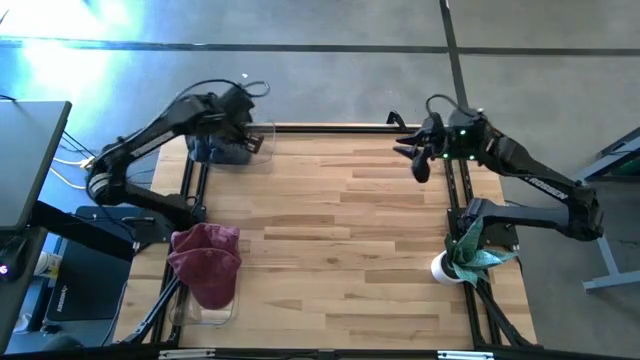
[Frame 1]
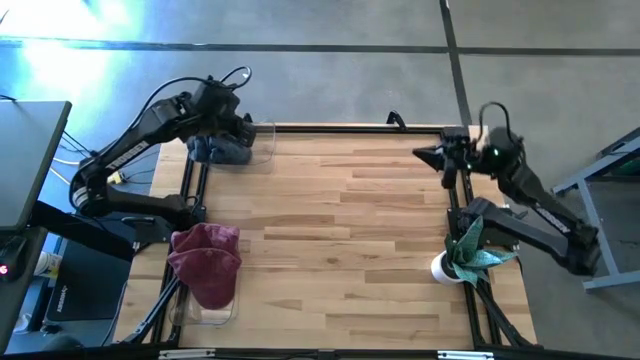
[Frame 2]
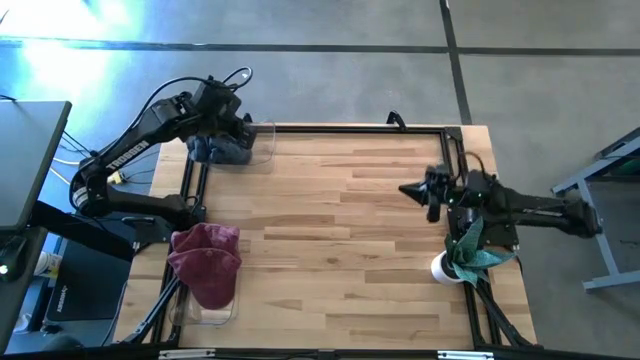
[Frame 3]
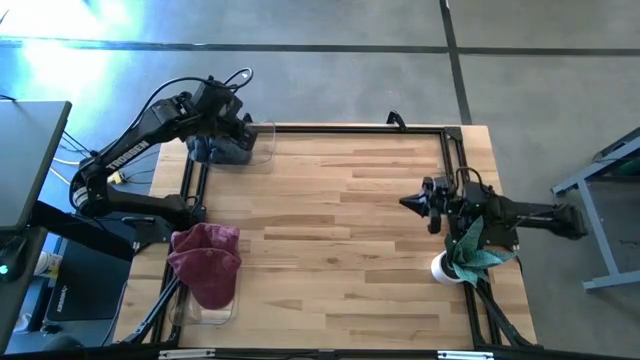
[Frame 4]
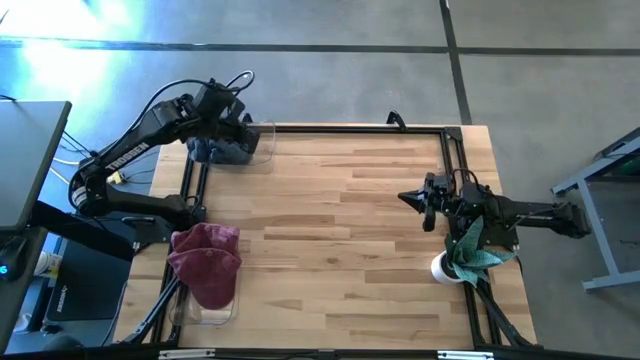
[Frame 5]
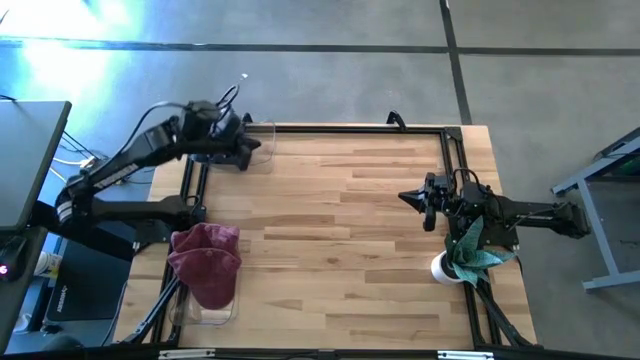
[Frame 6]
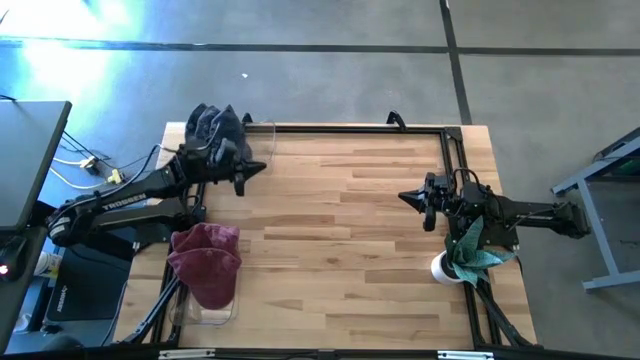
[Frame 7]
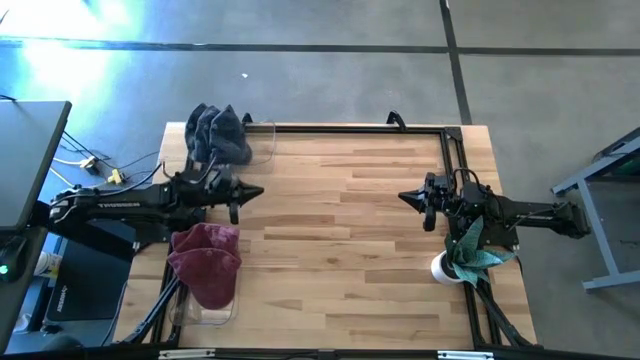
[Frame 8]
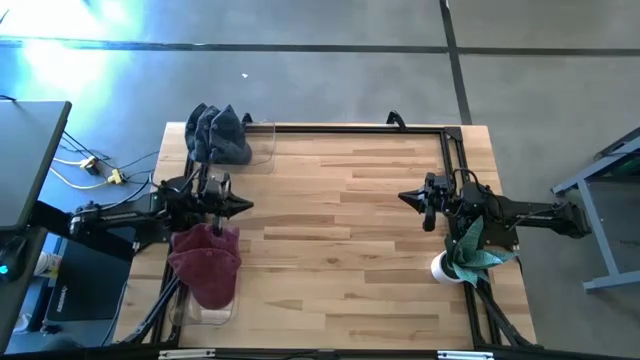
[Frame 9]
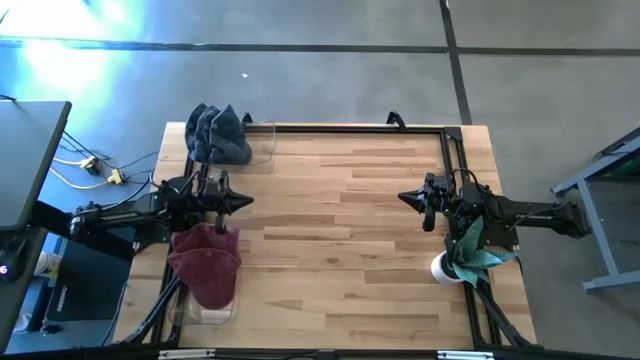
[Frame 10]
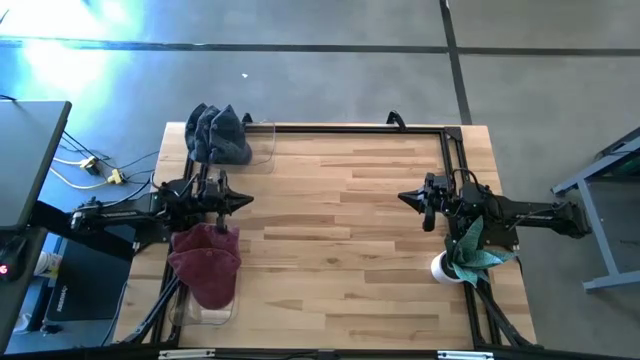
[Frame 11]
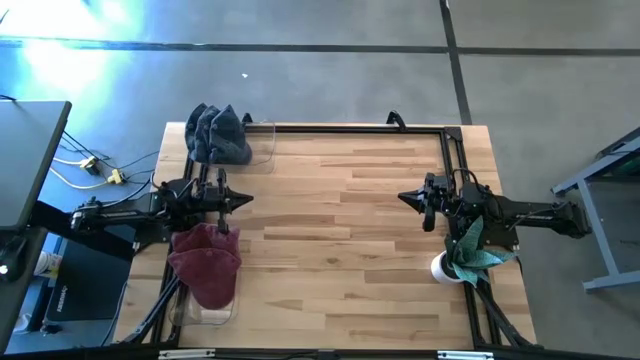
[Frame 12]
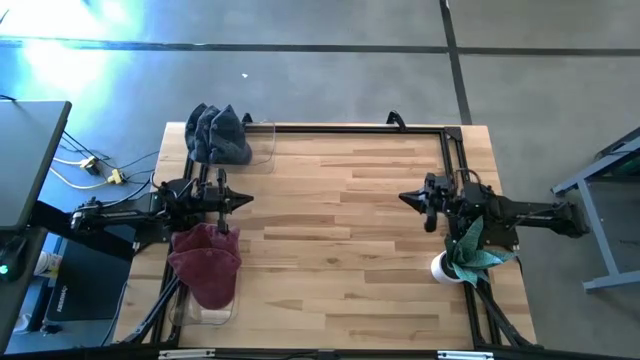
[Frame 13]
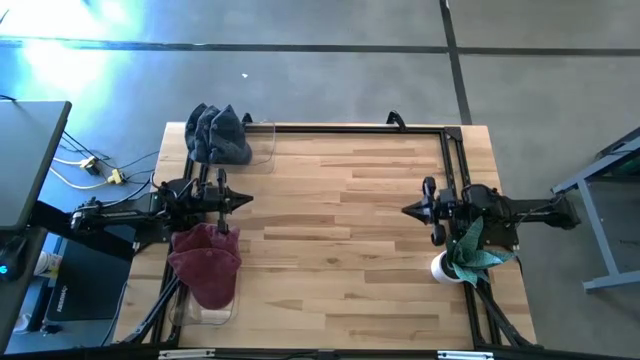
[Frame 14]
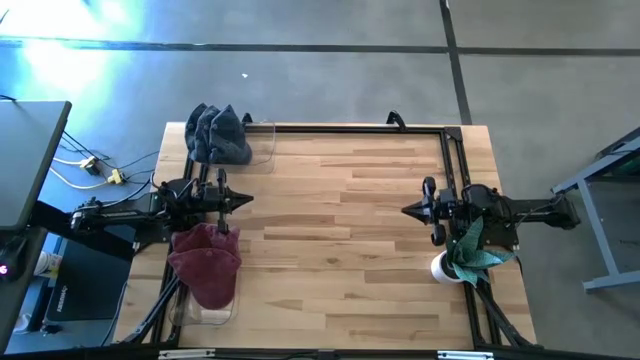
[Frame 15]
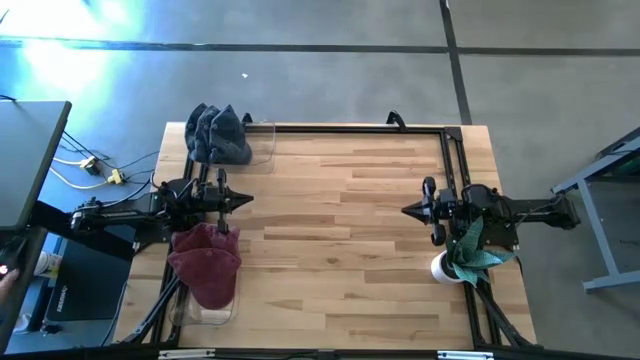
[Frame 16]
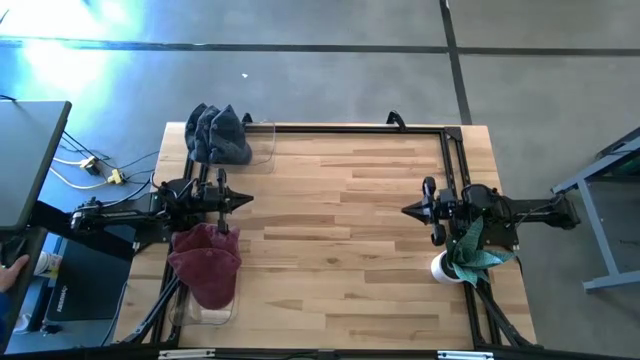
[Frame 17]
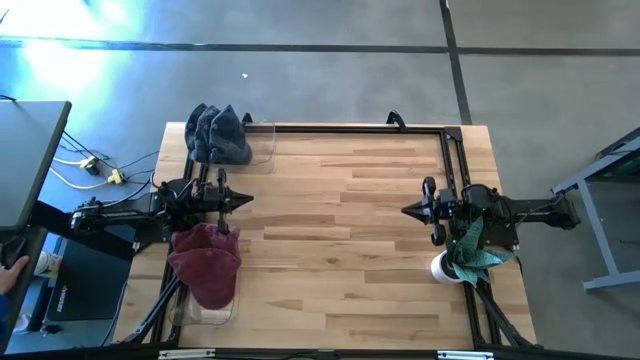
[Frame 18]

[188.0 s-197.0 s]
Task: Pick & Place hat
Return to Home Position

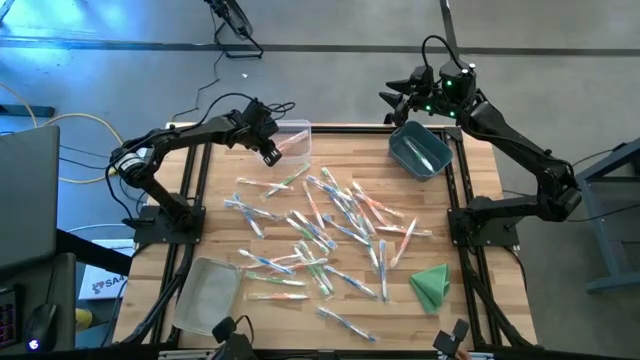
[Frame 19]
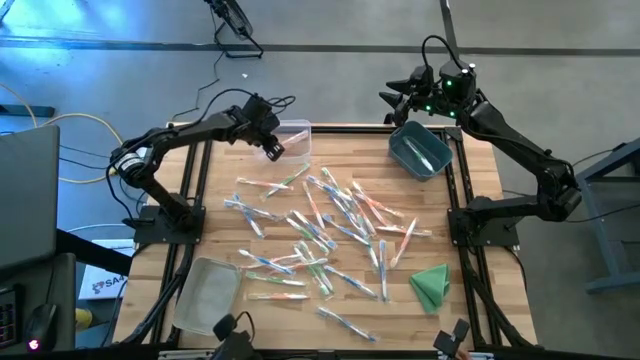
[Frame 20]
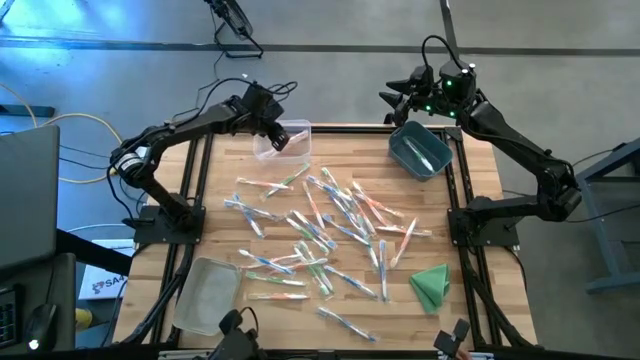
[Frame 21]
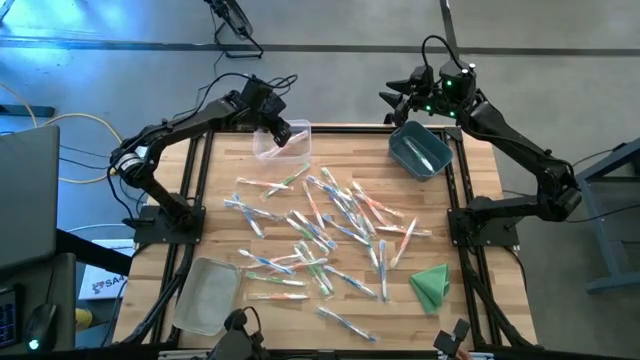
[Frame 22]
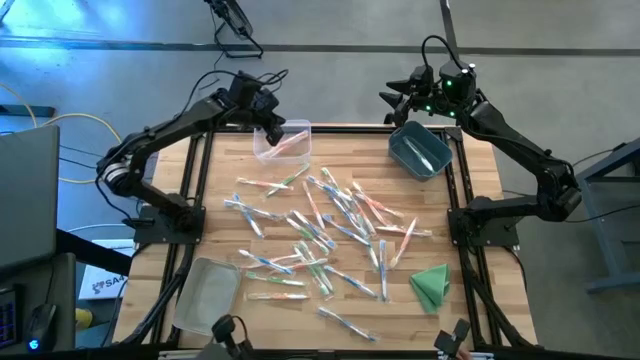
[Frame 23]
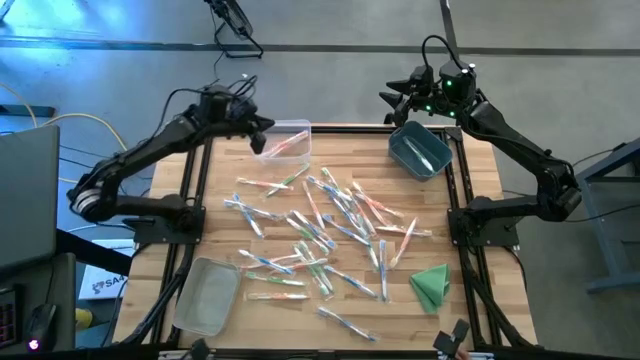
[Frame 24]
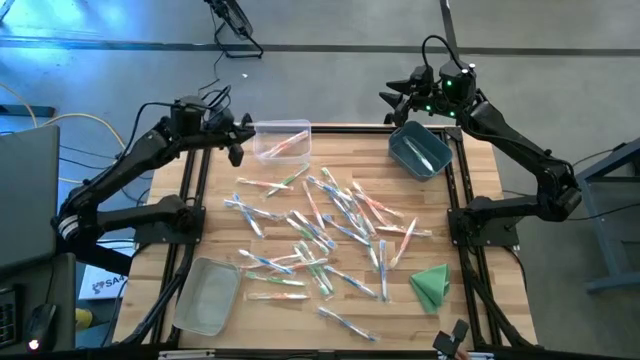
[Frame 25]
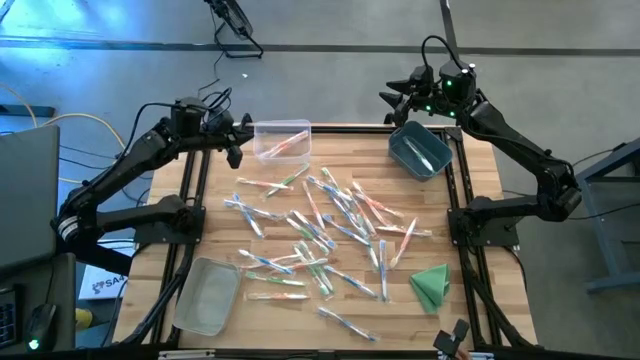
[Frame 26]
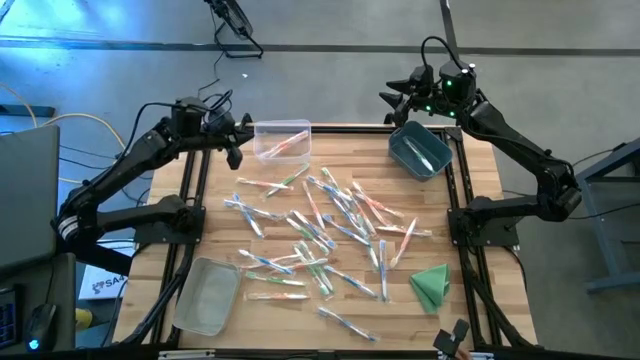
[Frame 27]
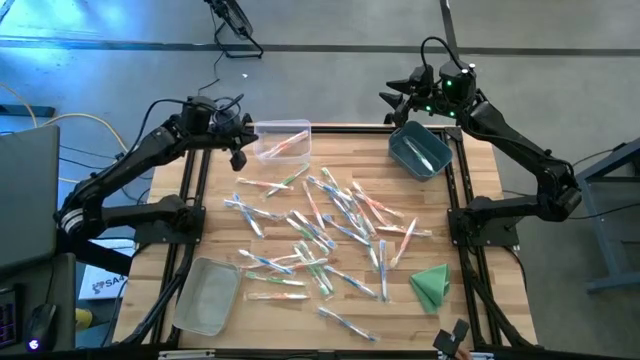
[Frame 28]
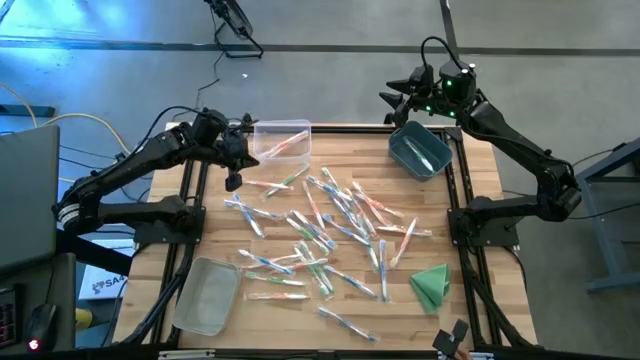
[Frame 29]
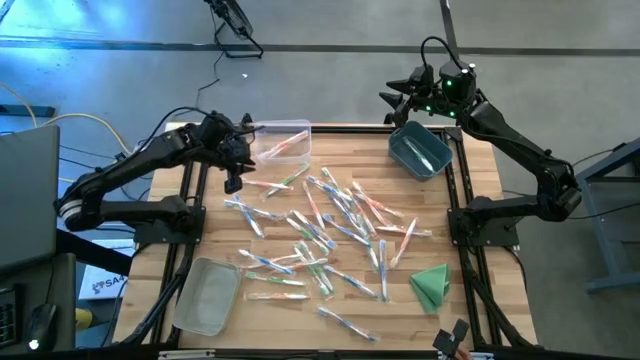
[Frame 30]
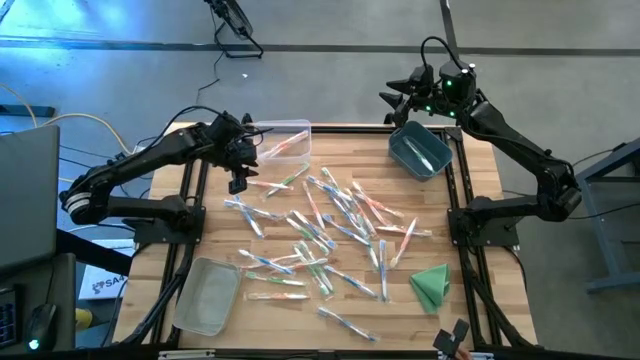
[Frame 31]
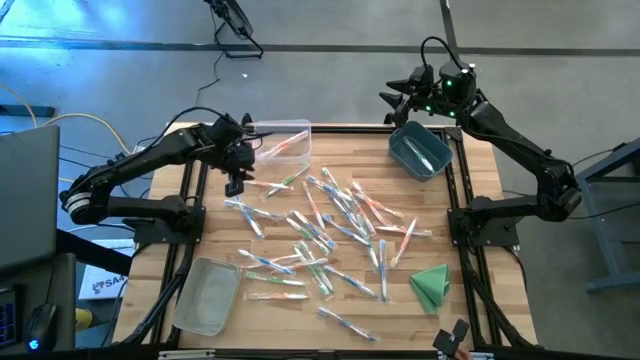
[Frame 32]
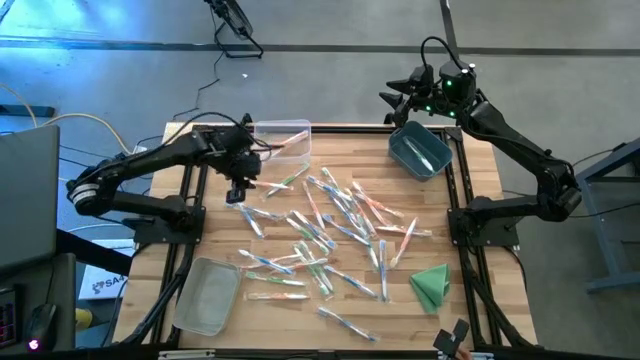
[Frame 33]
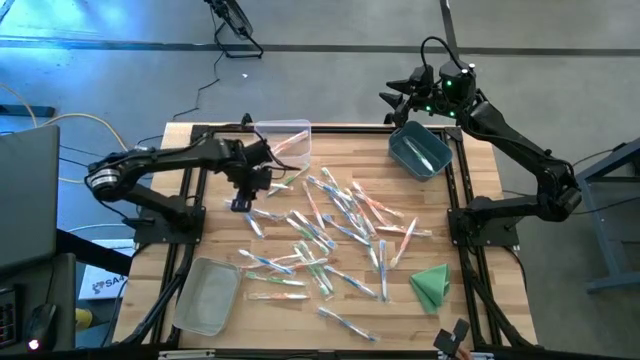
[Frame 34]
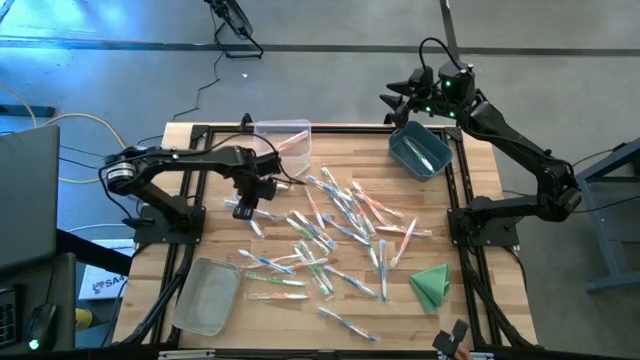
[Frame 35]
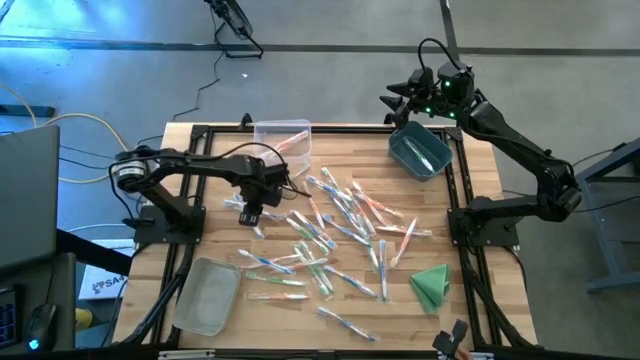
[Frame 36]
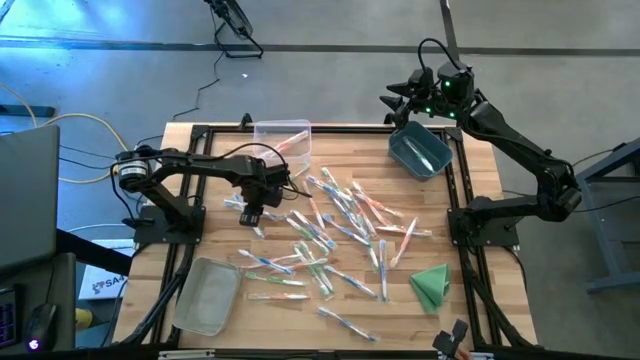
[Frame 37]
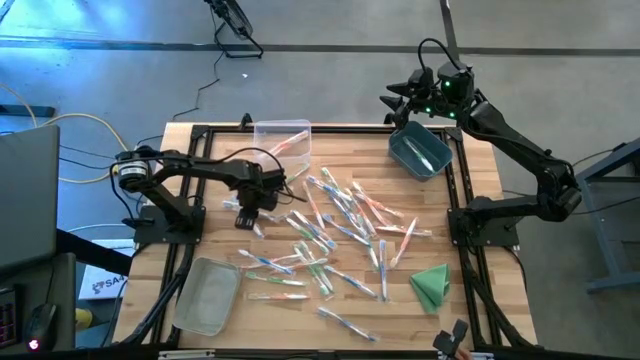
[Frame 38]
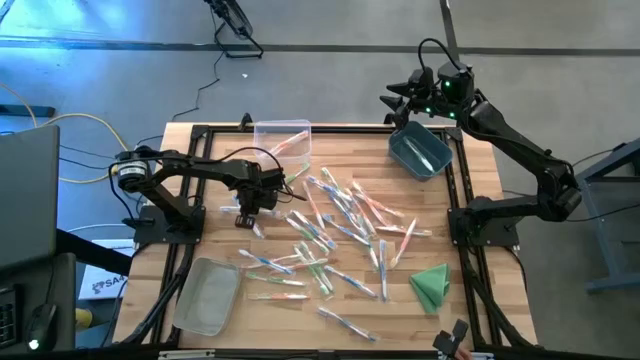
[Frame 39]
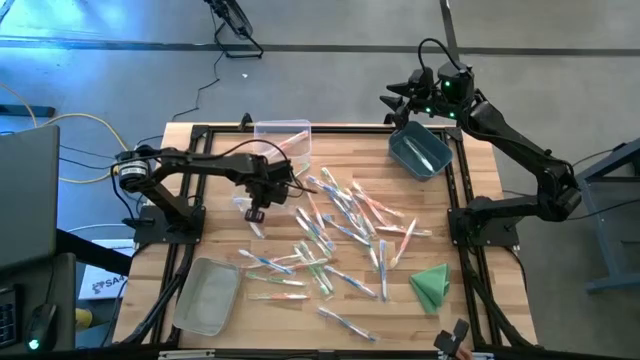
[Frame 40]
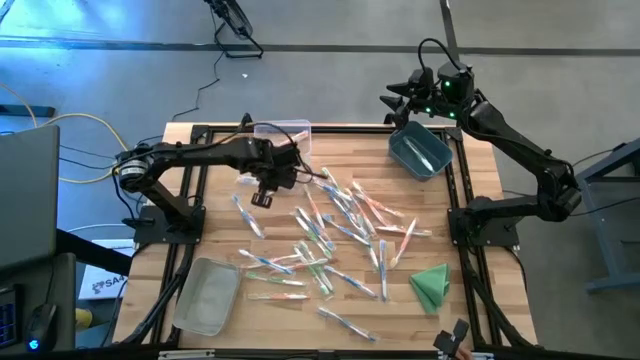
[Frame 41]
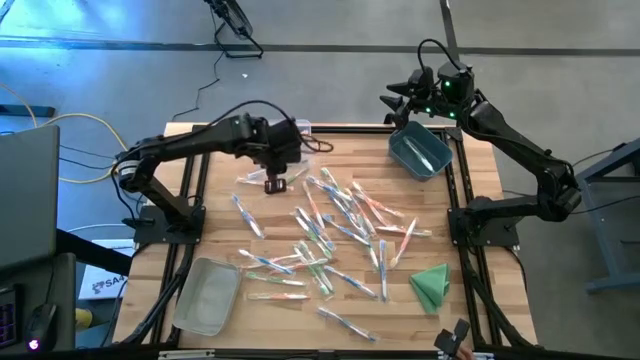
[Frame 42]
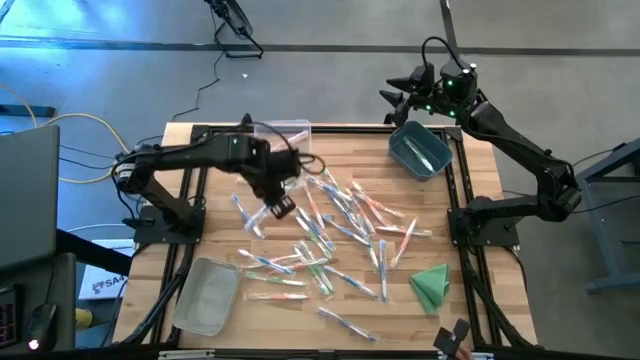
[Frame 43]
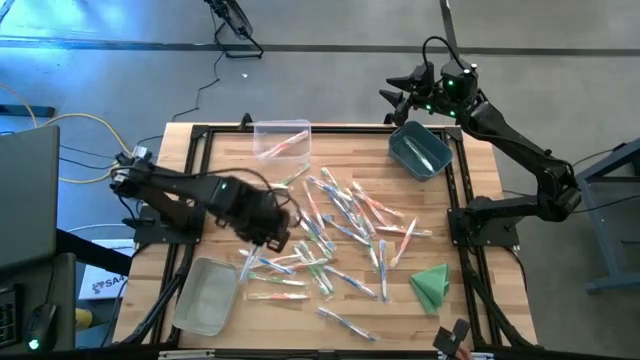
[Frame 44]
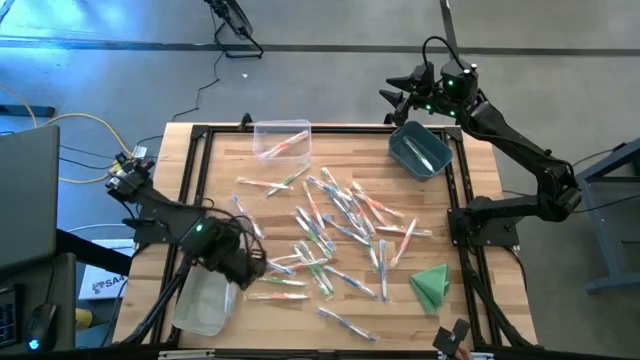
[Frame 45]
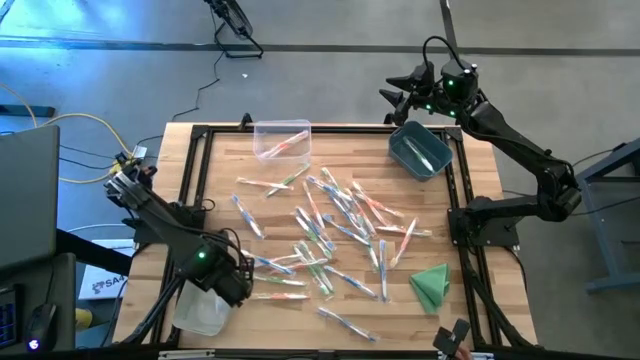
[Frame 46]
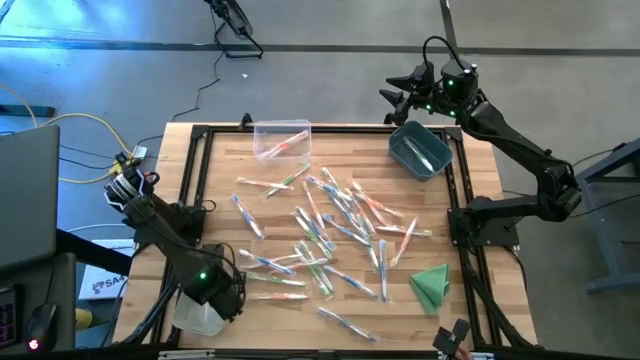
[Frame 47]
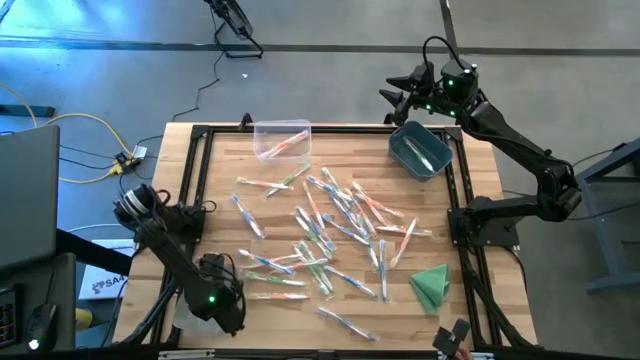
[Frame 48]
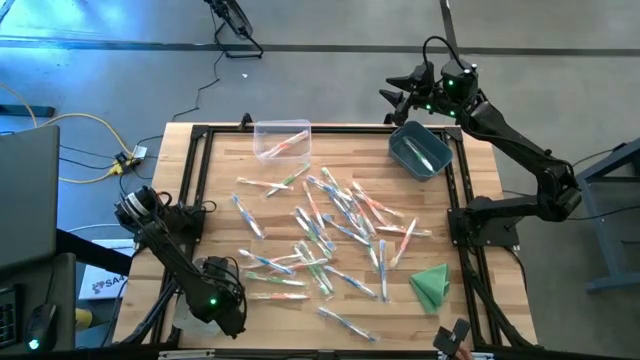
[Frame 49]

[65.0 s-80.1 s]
Task: Pick & Place Toothbrushes
Put the blue toothbrush into the gray bin
